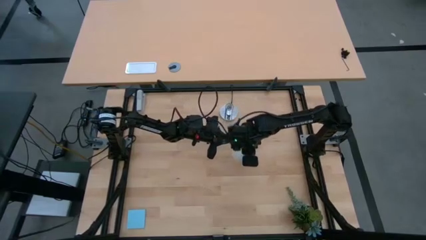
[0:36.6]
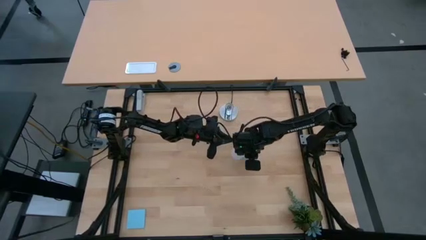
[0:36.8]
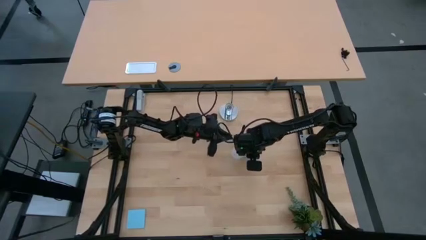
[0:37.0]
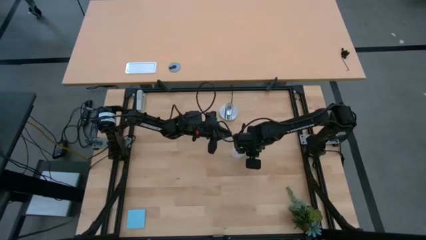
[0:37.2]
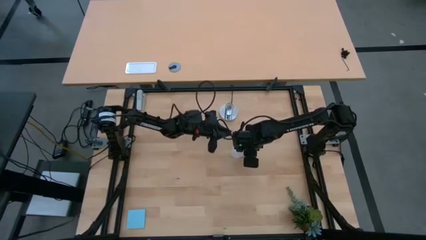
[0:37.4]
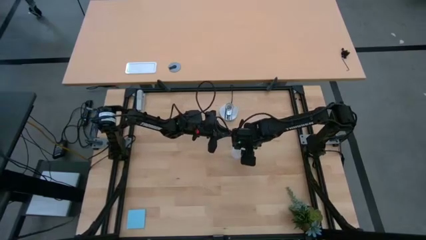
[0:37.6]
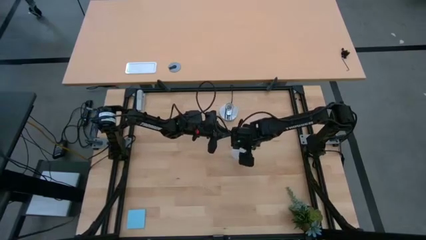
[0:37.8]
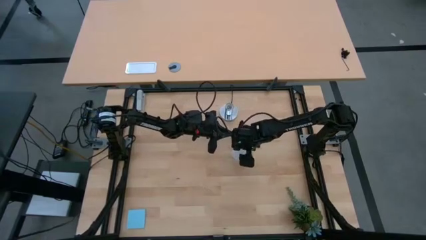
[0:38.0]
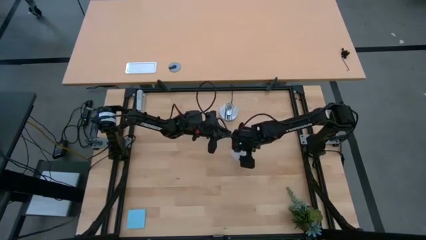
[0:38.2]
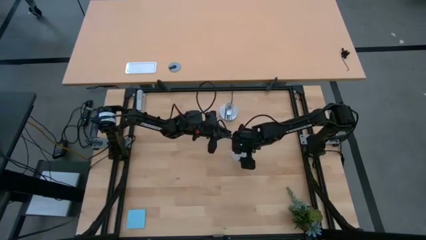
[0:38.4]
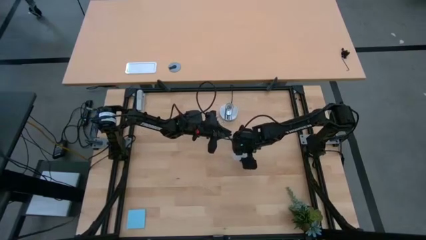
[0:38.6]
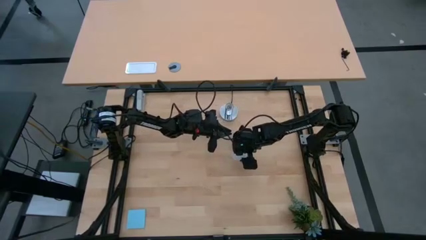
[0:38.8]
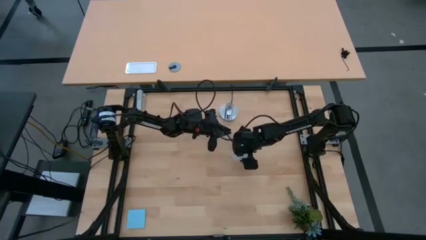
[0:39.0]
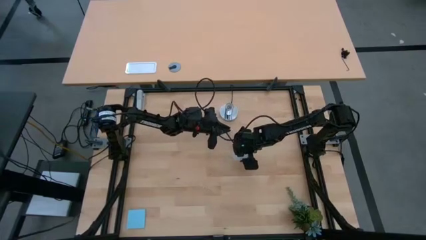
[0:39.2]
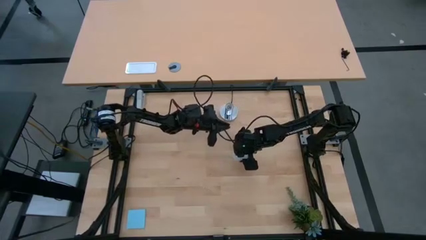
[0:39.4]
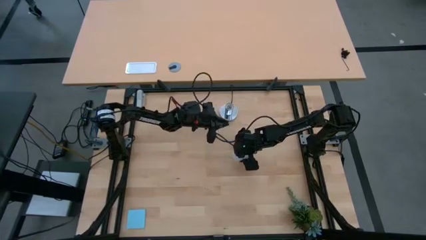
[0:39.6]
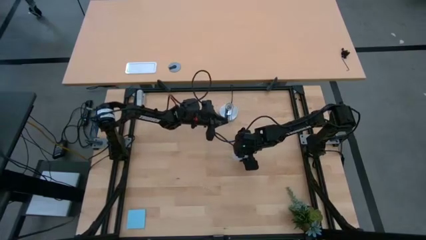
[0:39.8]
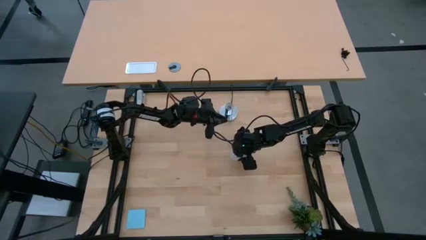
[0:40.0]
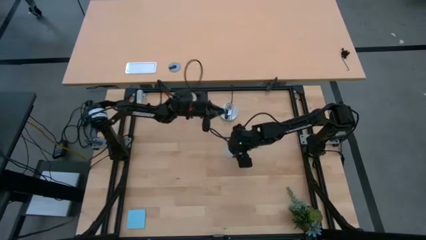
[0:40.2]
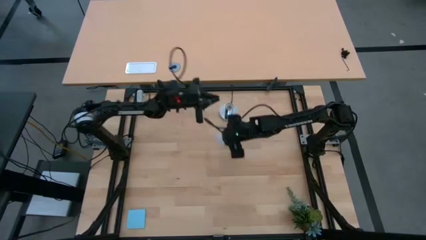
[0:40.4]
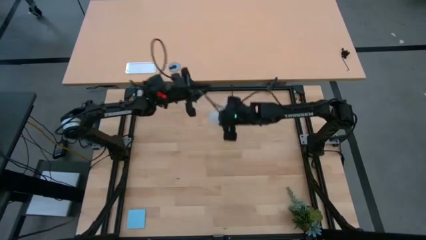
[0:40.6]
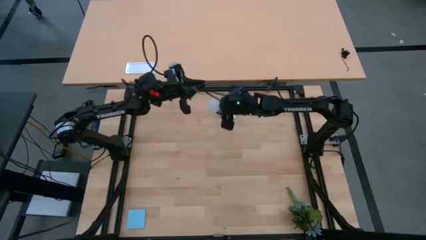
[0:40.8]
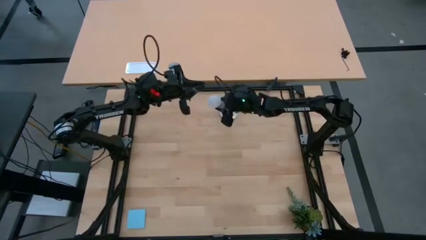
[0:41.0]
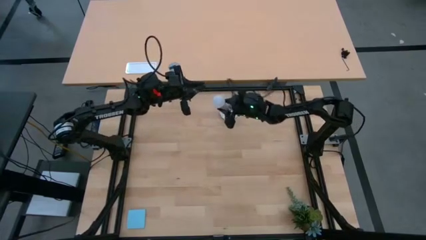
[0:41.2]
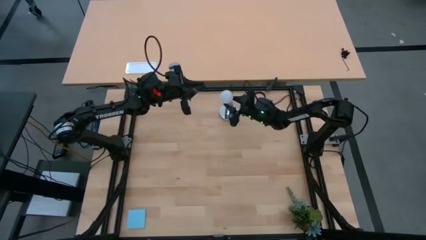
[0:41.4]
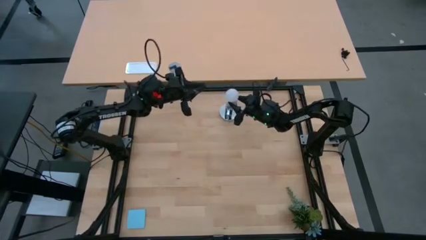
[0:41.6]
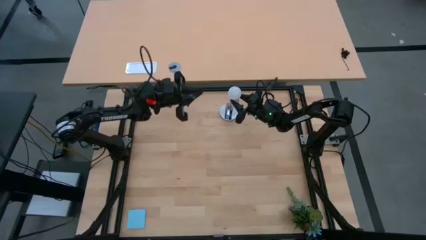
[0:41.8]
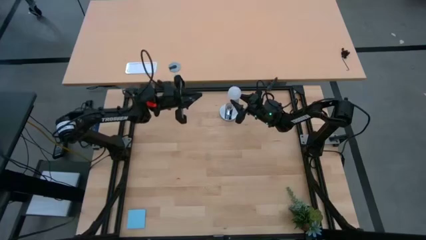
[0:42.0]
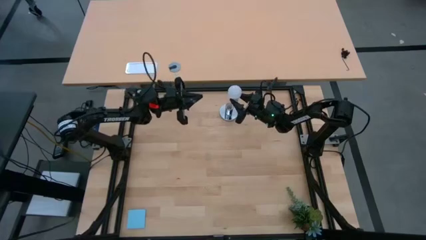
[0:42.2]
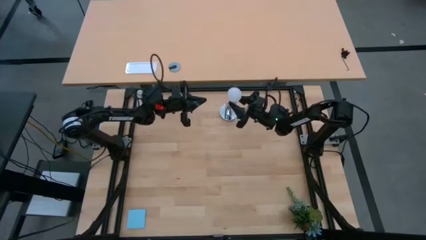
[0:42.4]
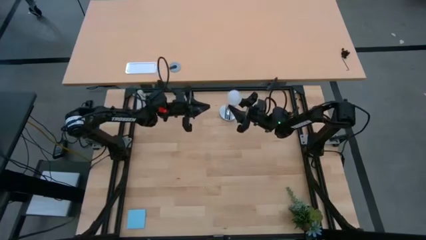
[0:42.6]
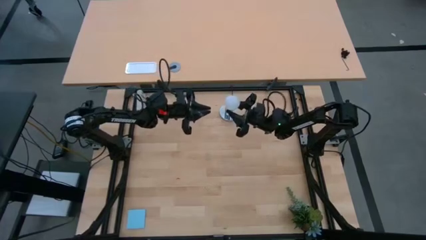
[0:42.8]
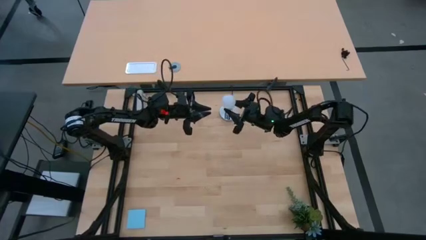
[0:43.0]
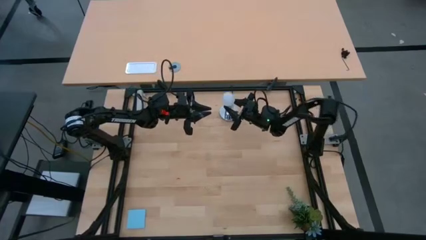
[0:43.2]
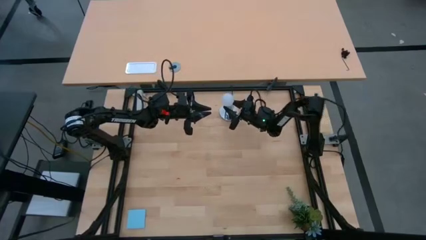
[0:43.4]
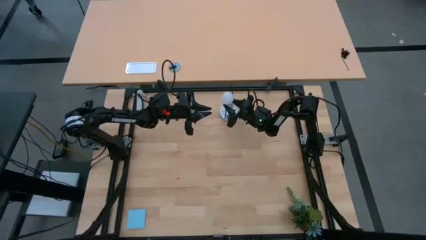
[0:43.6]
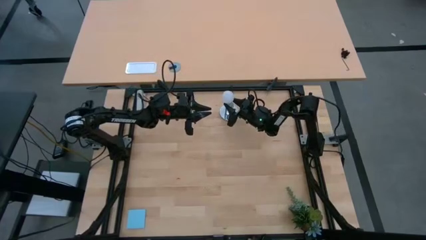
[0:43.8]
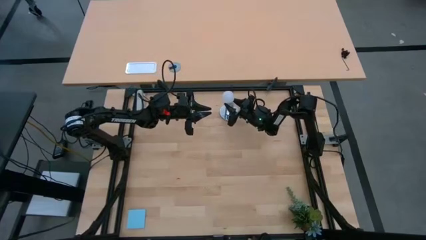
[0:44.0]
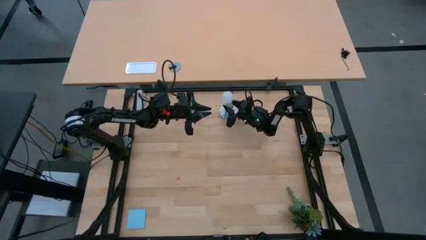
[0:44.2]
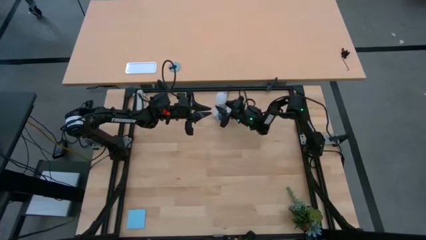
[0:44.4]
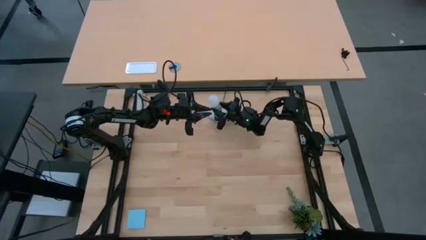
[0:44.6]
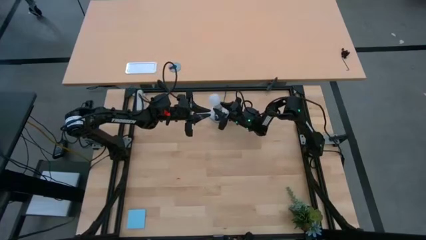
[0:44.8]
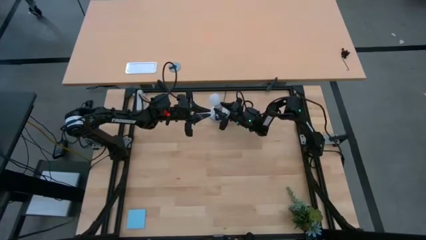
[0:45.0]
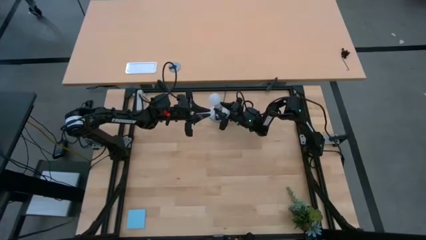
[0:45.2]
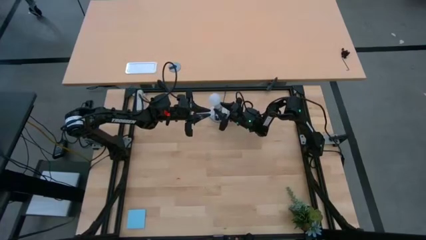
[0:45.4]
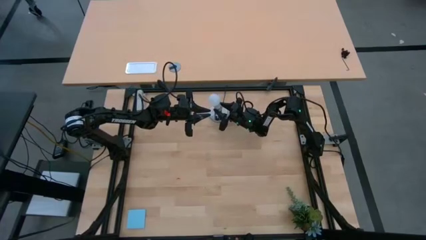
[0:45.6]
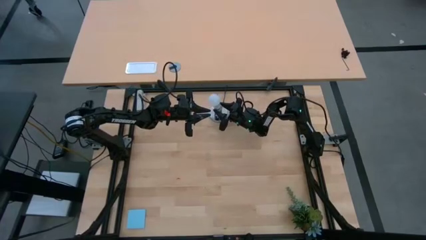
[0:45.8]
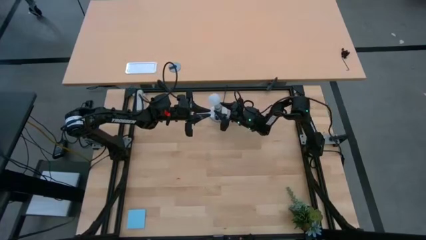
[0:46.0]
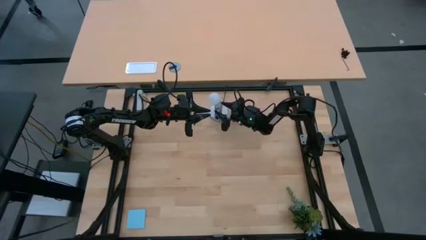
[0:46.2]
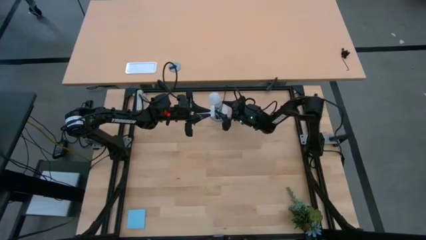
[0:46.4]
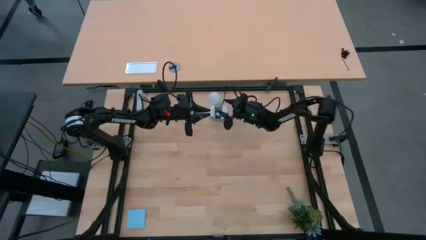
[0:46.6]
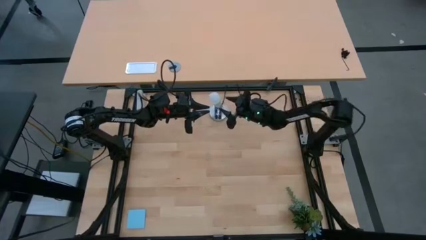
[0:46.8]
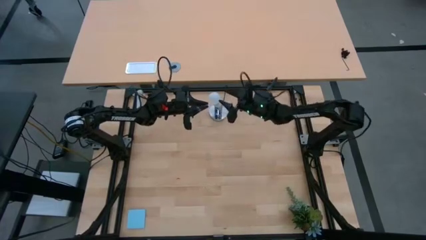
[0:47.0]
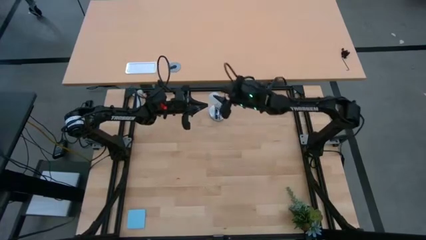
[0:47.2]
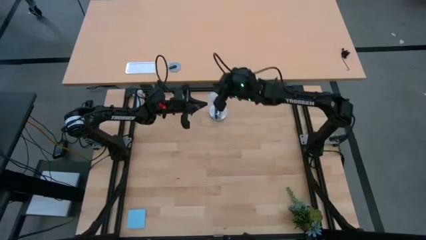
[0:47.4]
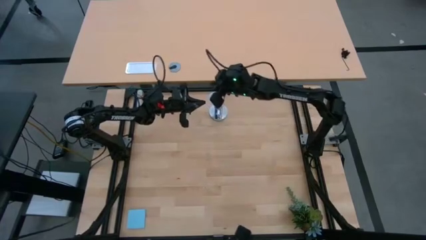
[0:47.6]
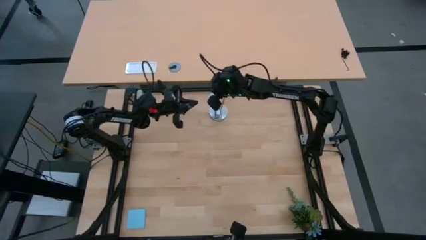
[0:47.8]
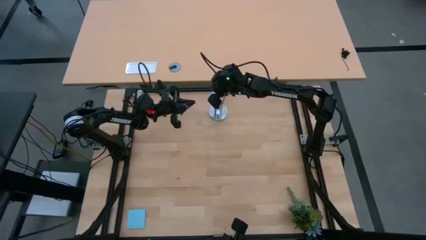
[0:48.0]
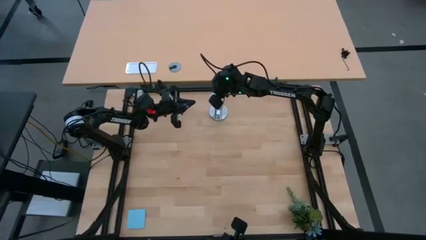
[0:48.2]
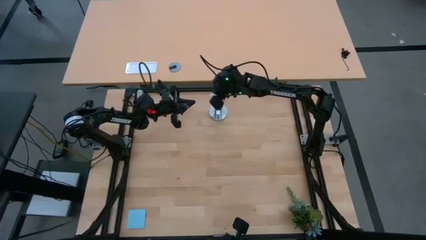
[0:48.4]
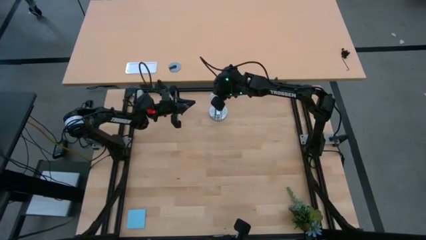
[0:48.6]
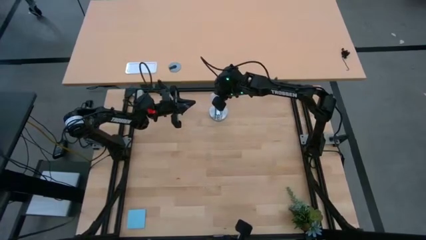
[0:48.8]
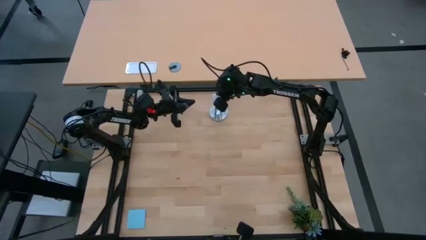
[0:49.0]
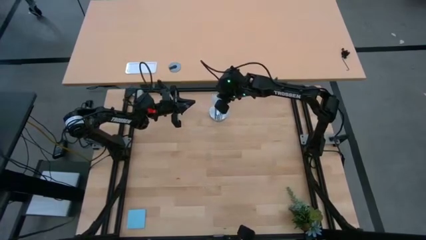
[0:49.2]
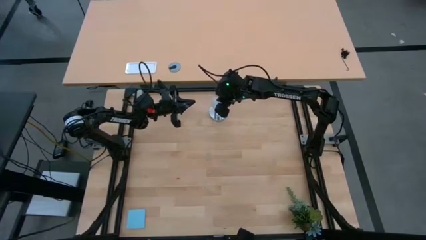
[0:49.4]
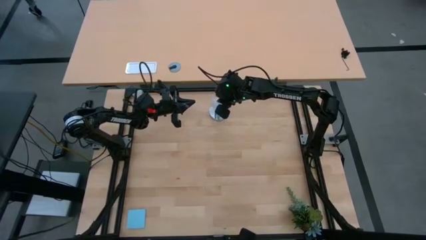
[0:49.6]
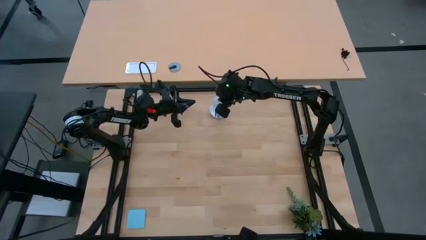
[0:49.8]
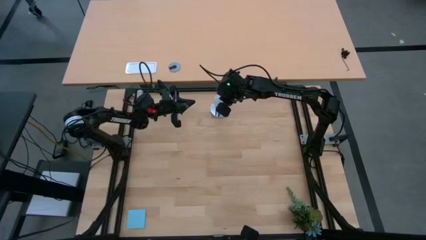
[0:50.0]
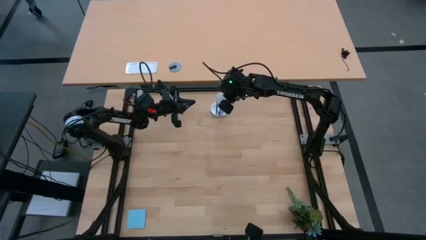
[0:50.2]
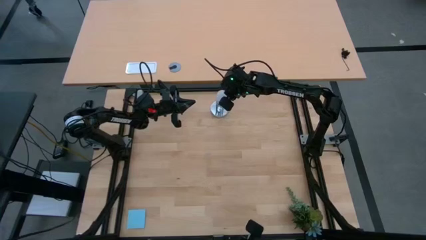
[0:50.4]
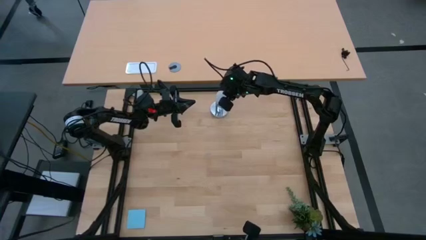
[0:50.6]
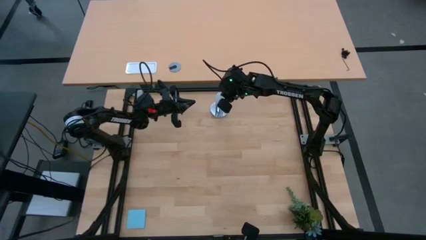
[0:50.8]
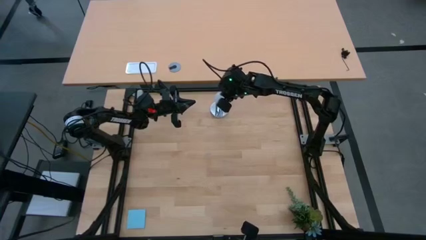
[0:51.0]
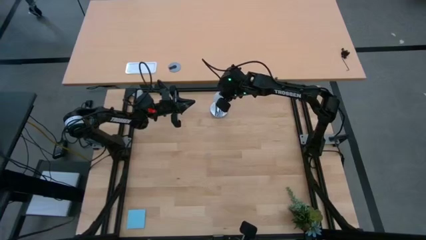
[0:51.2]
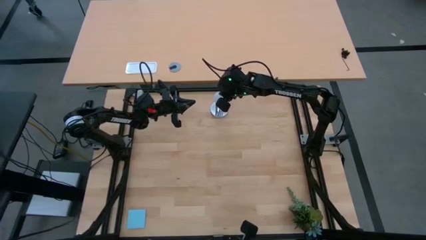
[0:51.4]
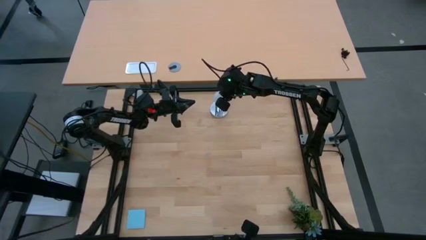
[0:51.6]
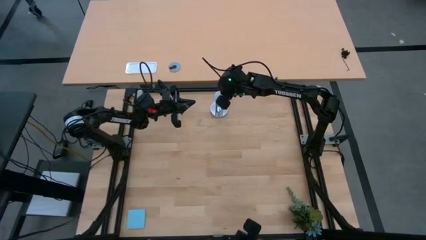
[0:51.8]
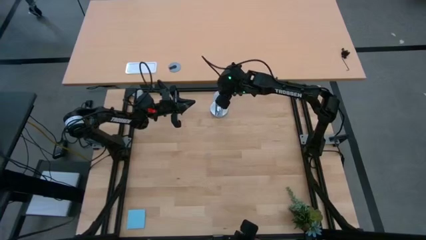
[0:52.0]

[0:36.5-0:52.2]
Task: Screw lightbulb
Insert the white lightbulb into the silver lamp

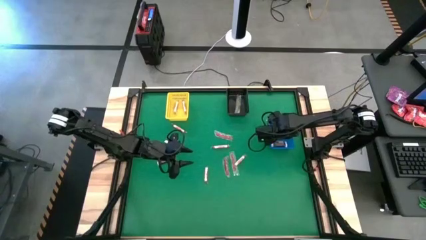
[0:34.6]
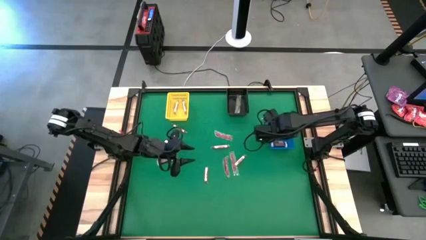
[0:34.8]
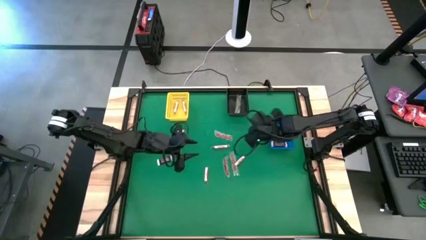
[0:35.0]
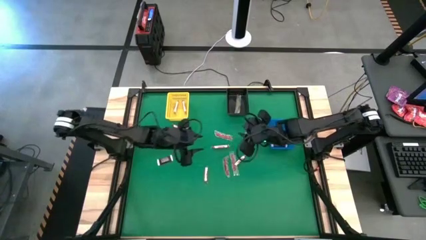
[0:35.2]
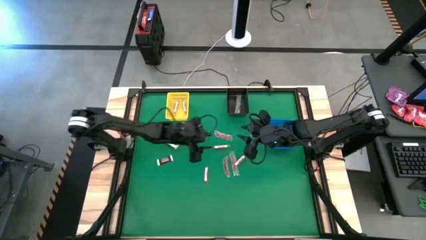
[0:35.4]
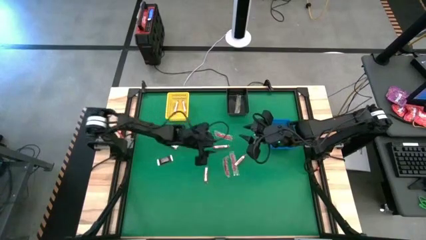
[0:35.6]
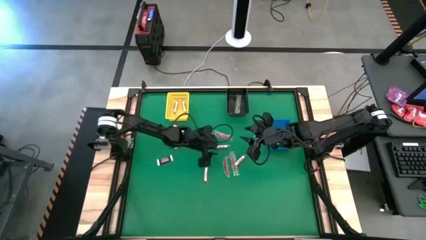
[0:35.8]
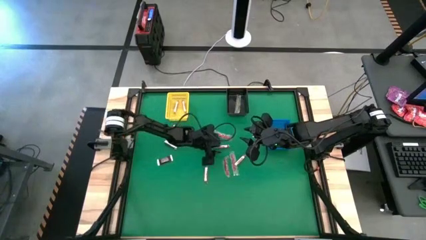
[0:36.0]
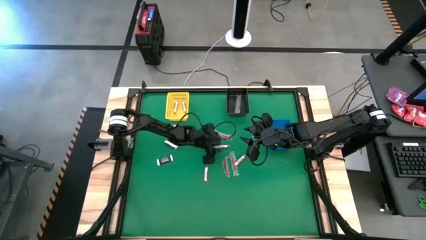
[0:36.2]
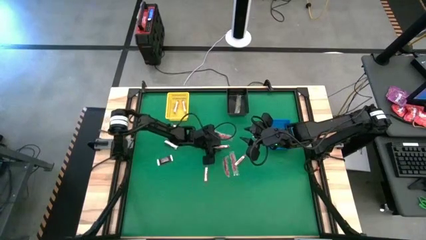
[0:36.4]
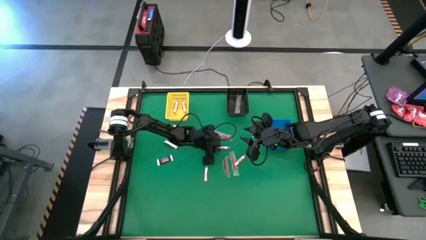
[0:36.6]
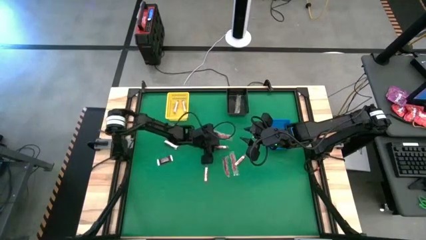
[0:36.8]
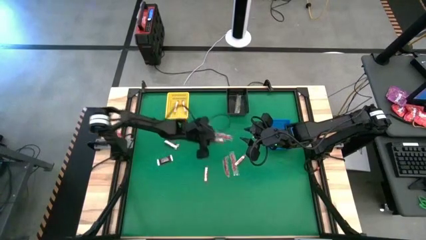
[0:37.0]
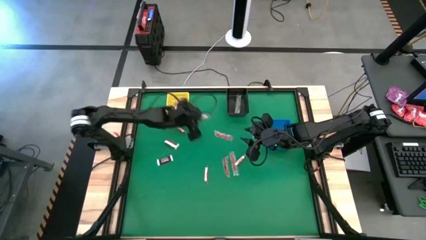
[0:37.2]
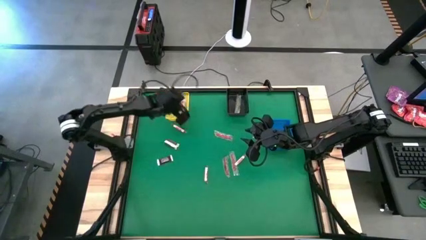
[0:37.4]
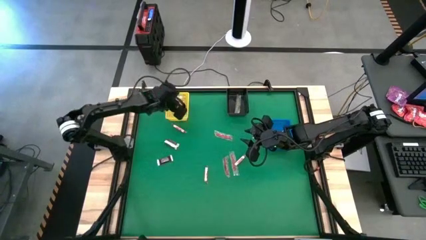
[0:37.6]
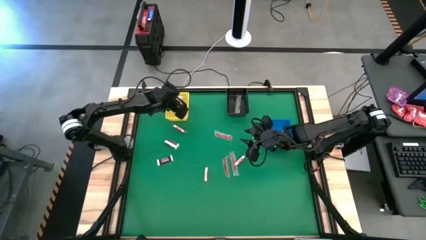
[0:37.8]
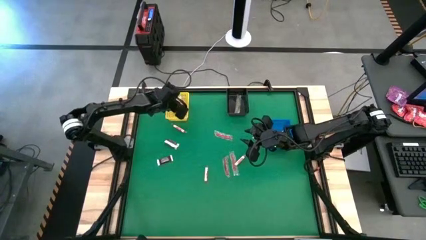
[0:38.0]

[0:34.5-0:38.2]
Task: Sort candy by brand, put in halloween buckets
Put the pink candy into the yellow basket
